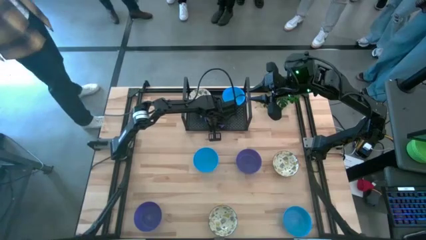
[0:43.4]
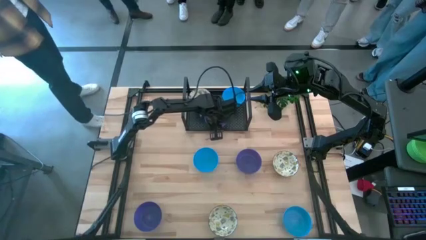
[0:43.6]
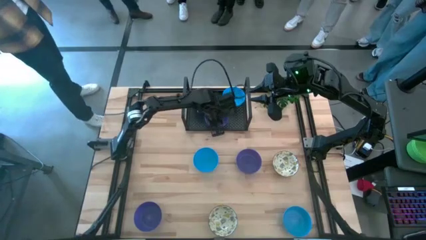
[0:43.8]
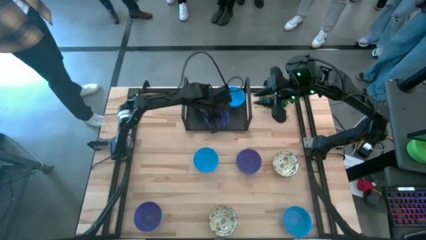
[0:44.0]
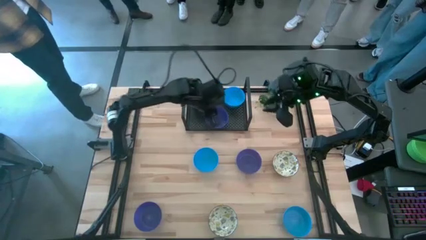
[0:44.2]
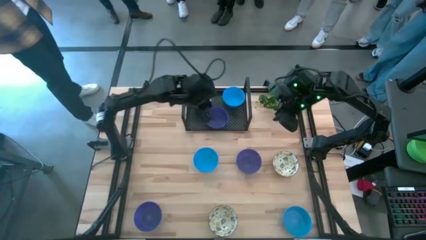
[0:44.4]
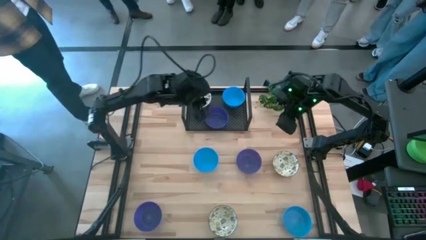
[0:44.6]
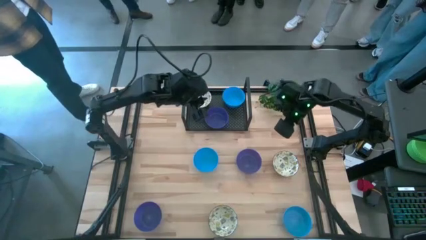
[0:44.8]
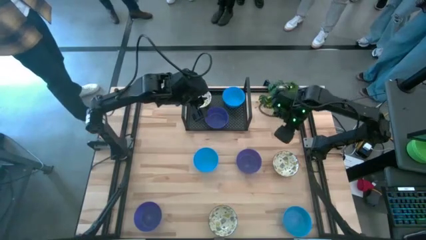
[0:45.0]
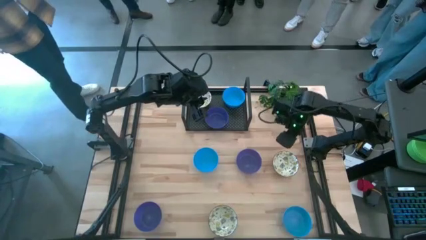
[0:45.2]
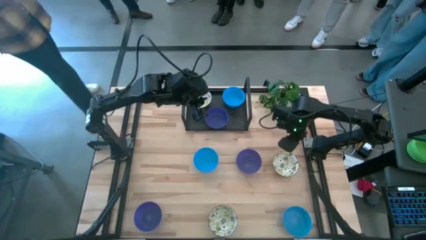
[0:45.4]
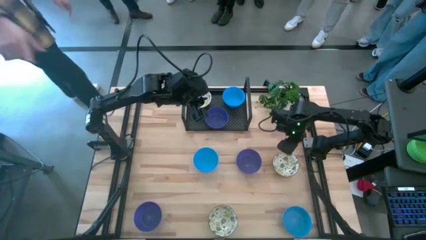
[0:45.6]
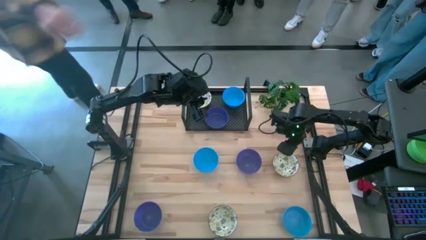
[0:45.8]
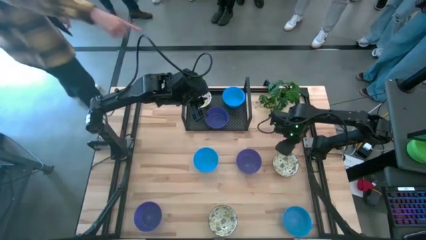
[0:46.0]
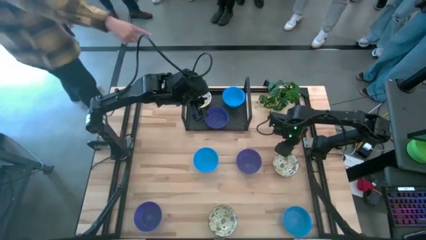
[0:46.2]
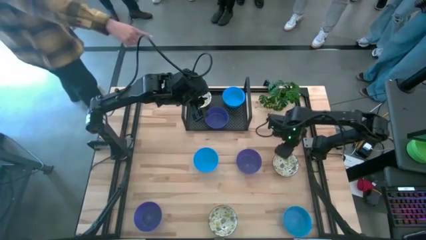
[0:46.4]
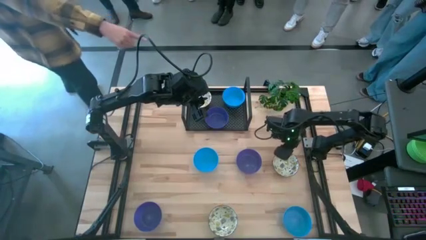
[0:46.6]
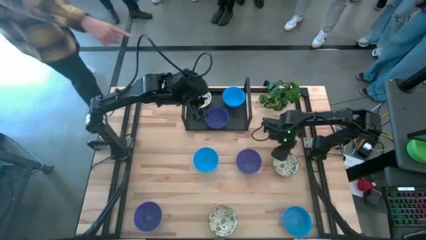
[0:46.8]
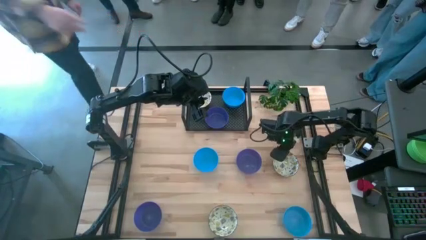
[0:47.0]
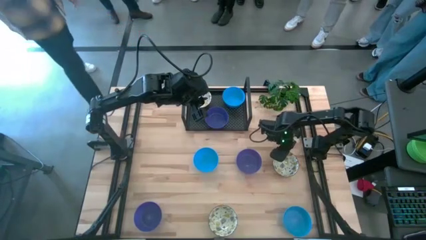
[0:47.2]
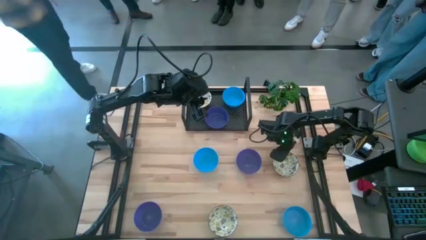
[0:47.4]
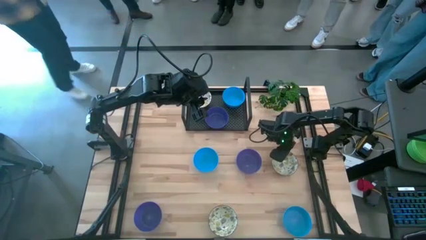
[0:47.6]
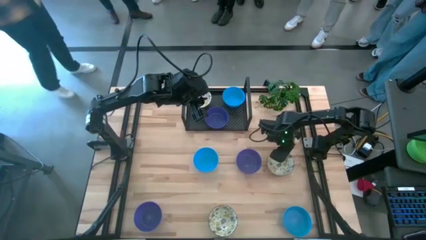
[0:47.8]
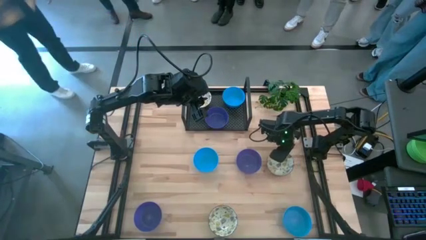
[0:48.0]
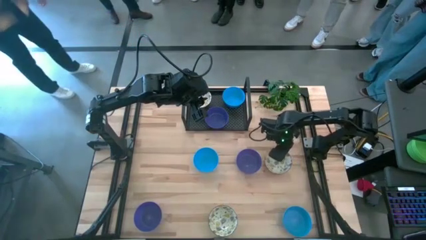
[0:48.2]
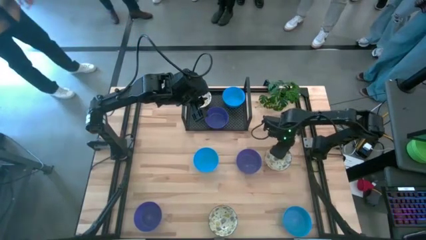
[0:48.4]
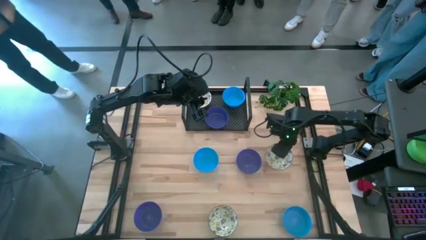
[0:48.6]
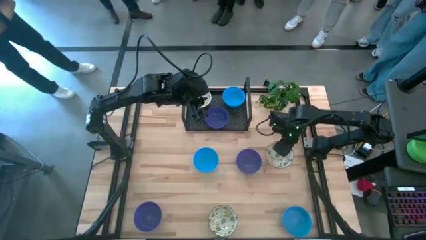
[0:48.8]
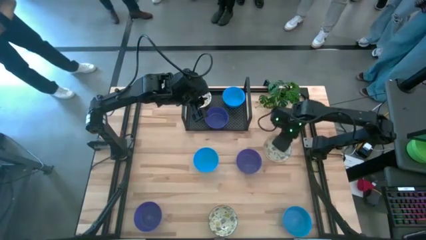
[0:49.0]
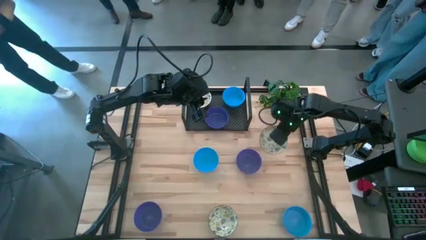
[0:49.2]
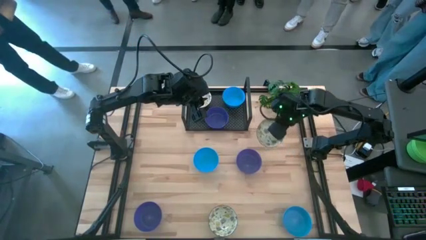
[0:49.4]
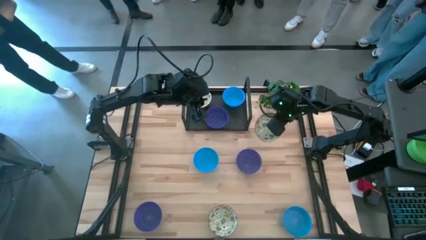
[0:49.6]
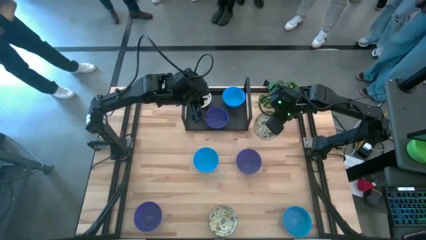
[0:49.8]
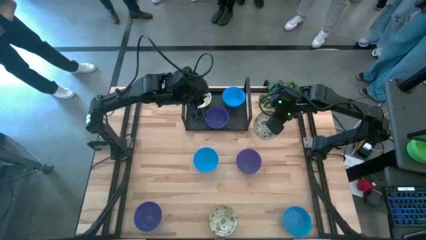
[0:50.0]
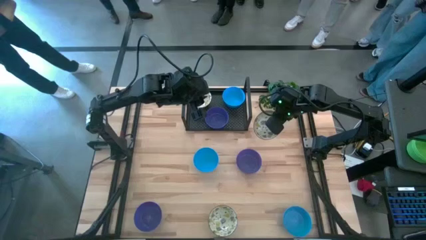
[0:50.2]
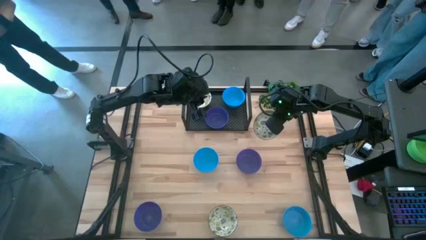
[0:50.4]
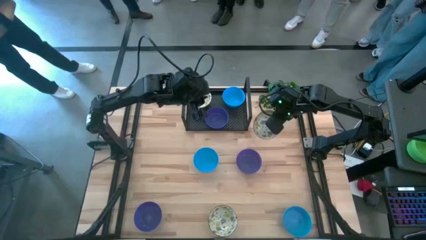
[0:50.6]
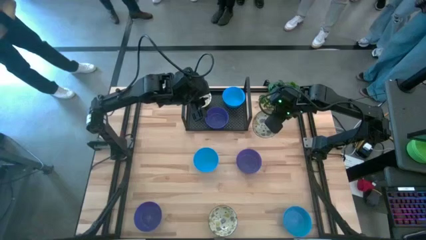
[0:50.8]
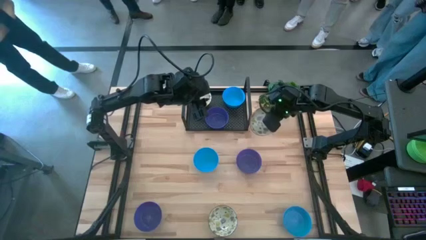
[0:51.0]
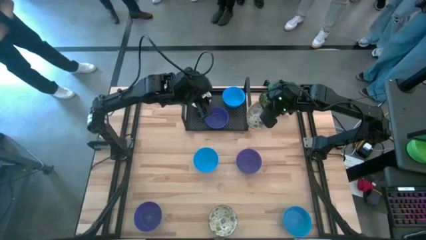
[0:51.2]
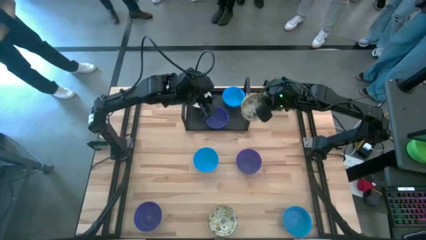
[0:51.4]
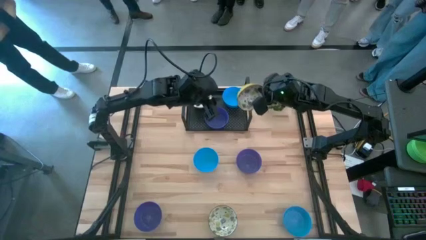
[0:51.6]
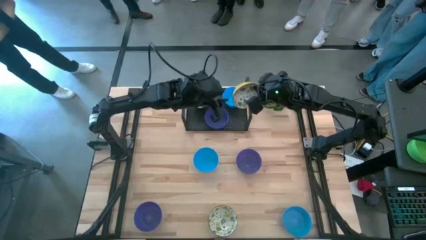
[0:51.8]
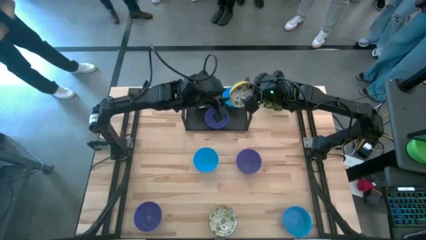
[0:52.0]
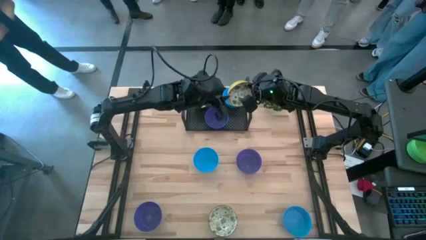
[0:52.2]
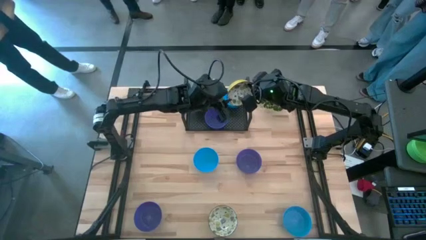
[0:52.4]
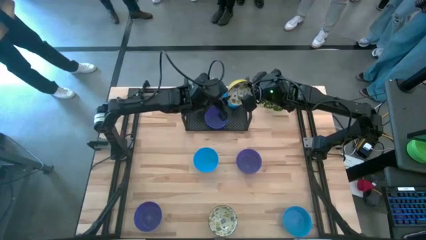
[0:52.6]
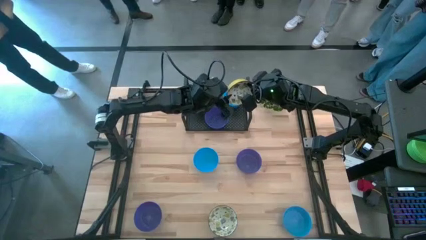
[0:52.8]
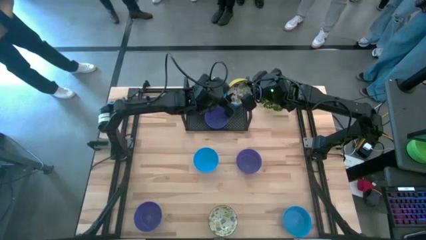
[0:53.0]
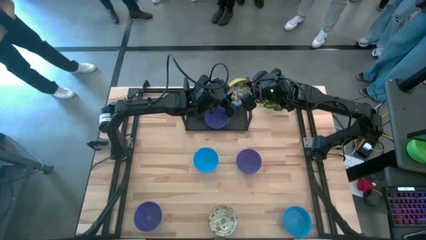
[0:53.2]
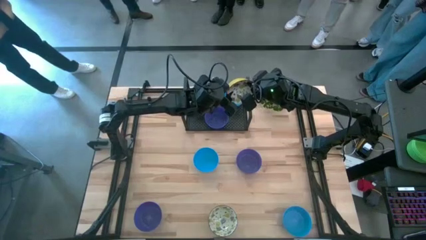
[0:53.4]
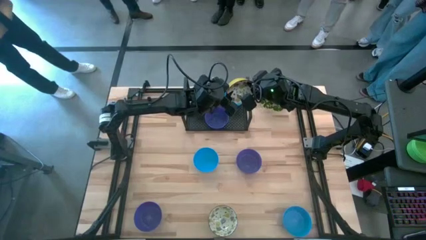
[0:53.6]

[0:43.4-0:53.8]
Task: Pick & Place Mini bowls
Stack the top white bowl on top of the white bowl on the shelf

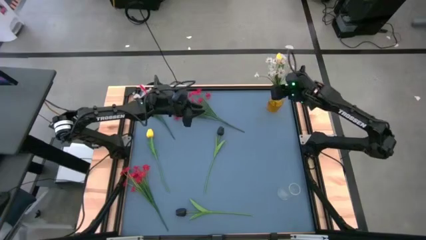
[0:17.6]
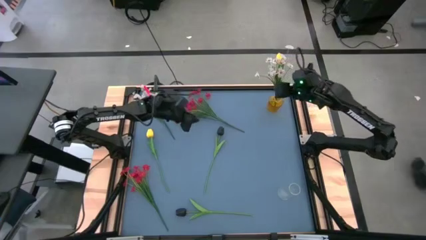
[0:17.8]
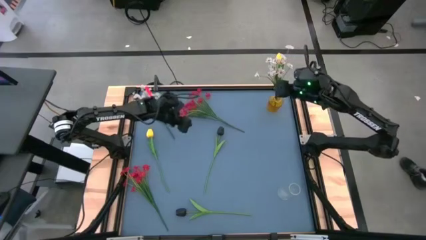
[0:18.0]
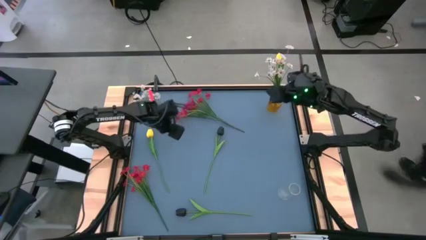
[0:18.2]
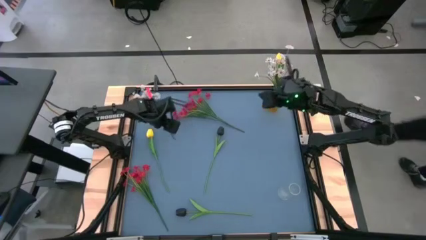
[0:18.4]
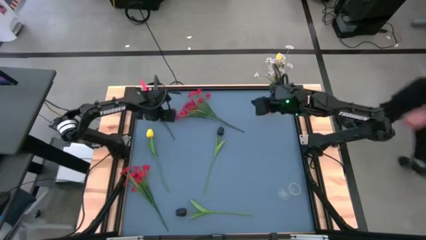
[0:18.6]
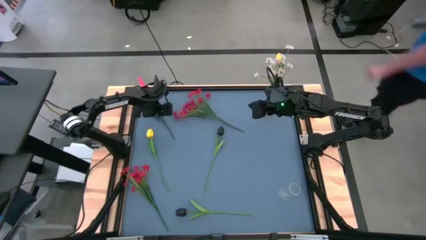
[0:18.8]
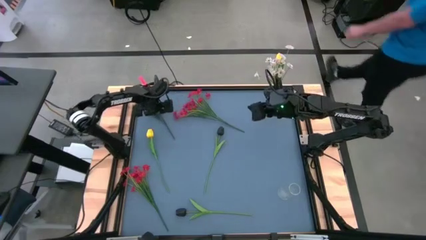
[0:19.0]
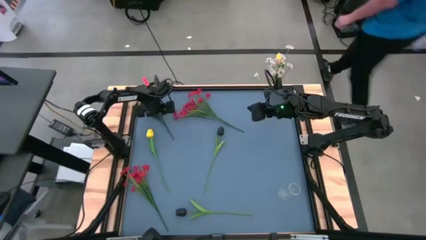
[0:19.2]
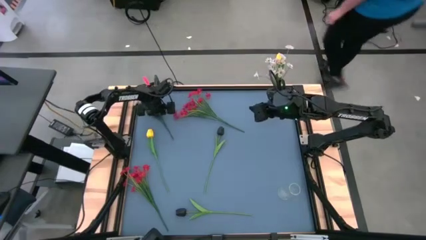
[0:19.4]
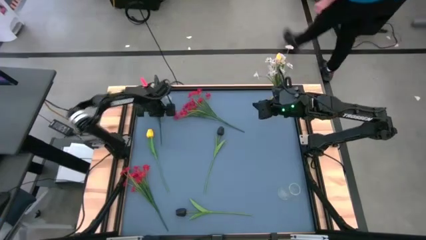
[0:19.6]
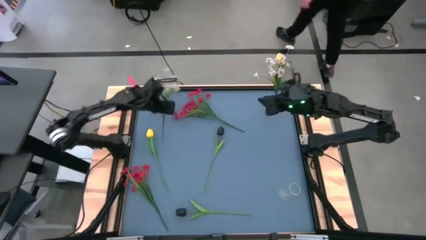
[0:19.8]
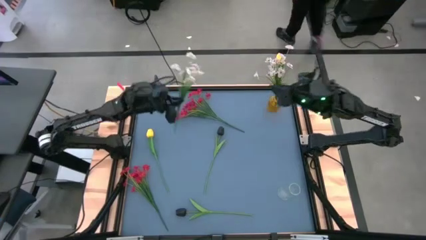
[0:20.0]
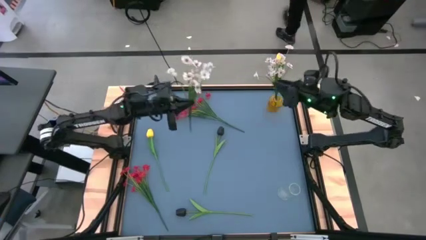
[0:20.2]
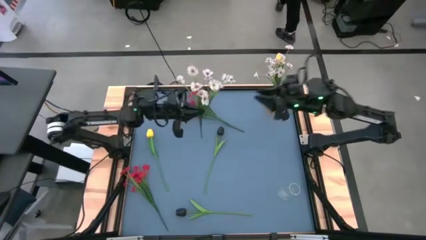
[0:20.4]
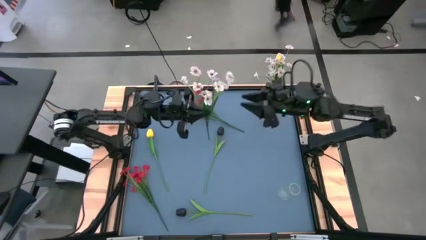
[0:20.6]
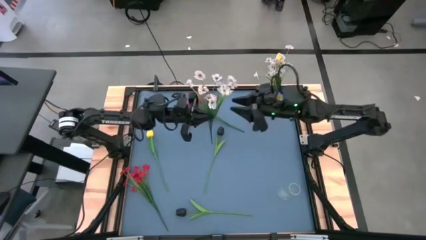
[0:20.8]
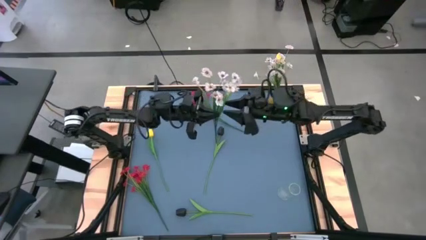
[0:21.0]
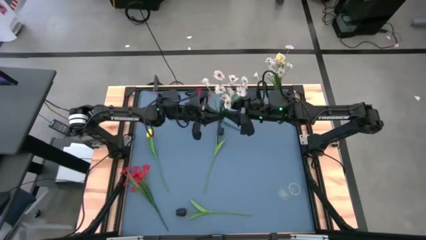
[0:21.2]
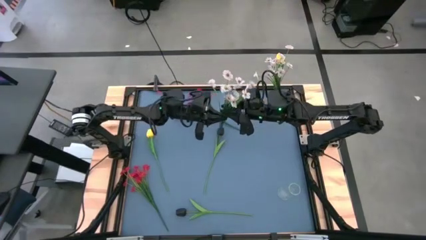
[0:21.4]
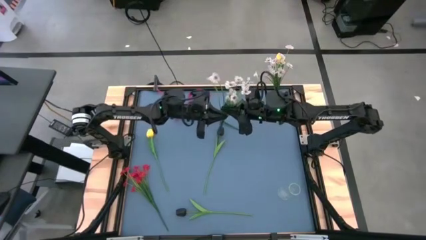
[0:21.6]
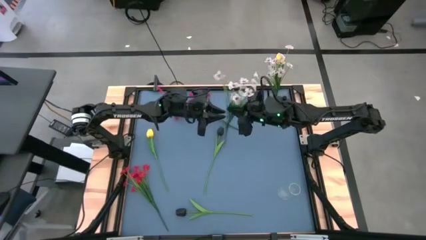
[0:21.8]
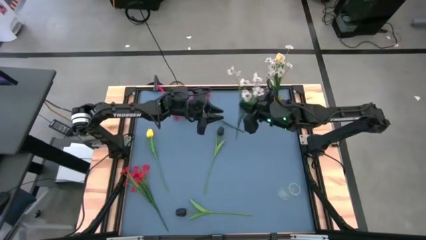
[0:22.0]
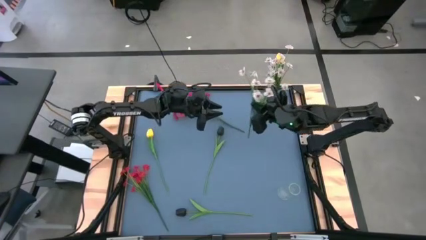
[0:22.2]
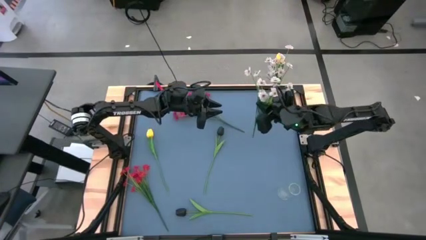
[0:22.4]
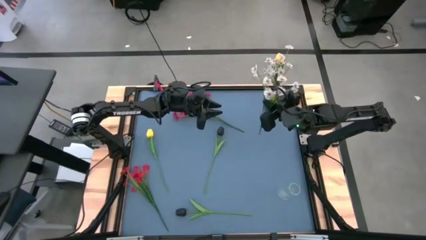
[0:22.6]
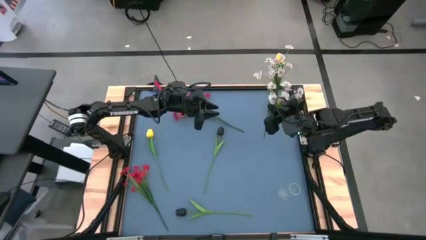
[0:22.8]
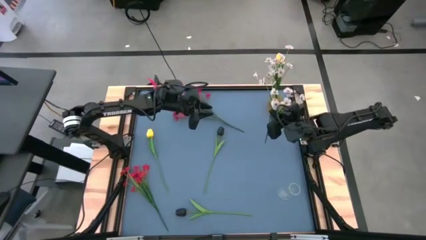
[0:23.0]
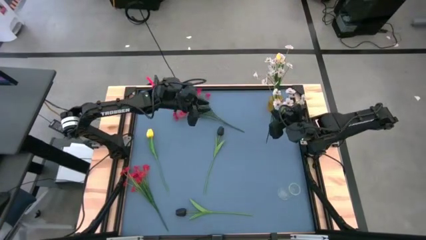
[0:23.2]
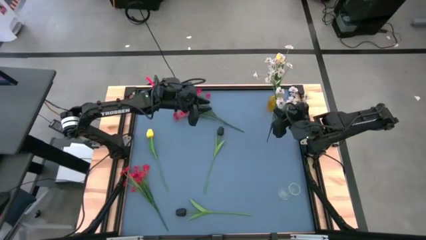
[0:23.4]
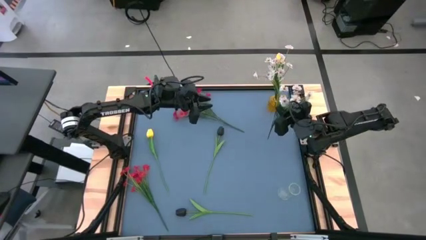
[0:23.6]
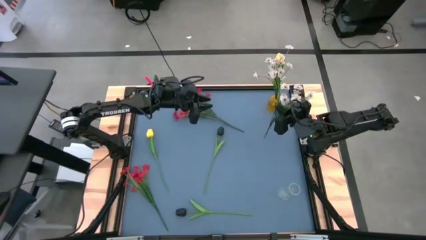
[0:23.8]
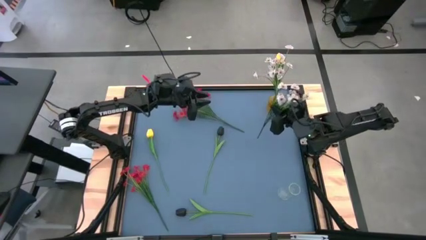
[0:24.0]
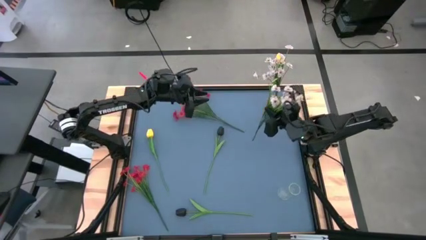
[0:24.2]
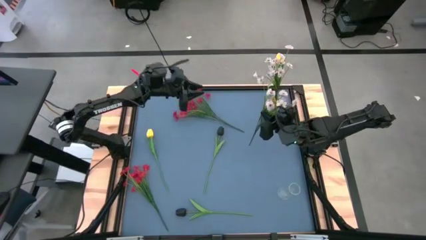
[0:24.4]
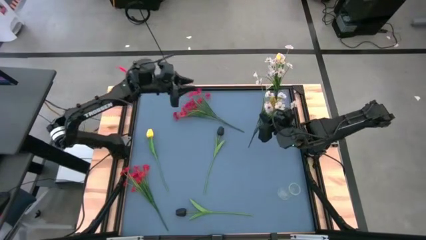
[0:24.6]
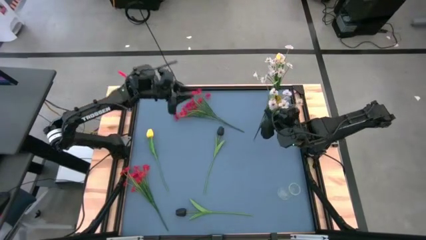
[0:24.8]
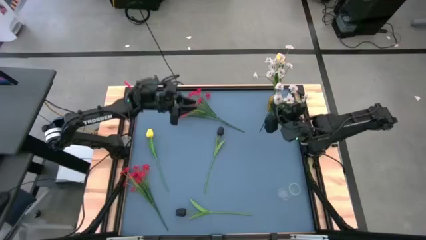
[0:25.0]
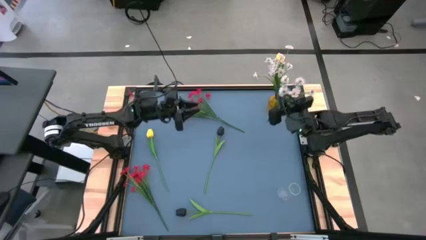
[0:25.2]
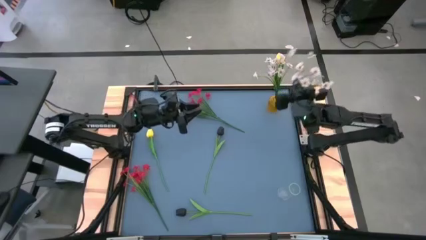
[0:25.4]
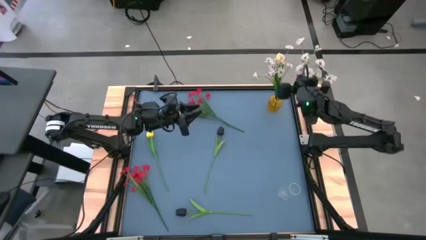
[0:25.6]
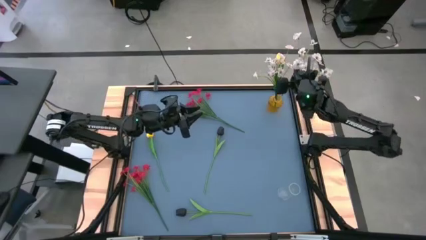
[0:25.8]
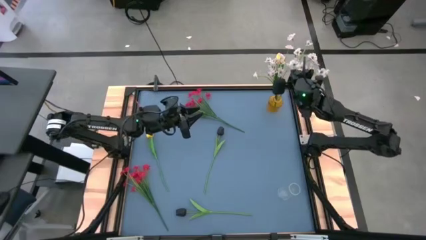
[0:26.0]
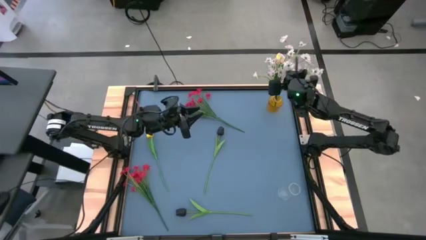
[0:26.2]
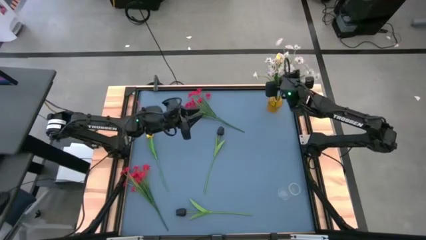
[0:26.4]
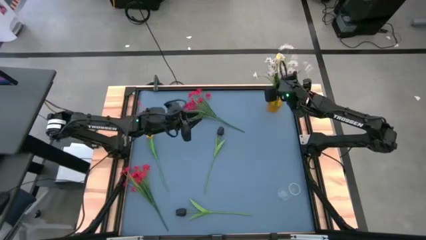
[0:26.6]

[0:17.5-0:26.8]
Task: Sort flowers into vase by color
Put the white flowers into the yellow vase
